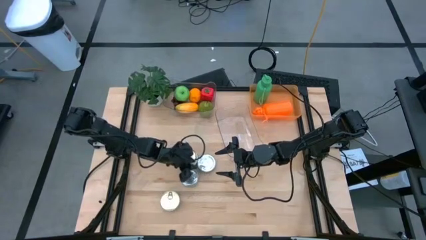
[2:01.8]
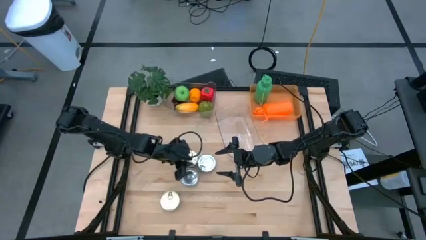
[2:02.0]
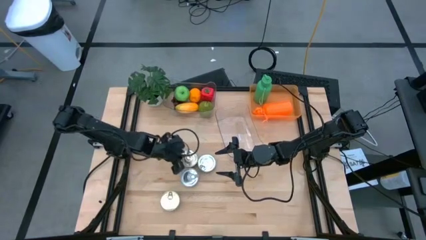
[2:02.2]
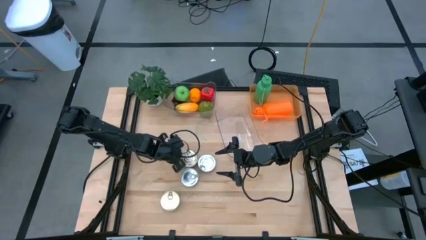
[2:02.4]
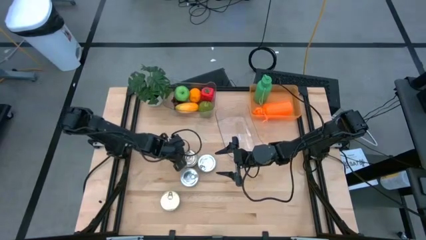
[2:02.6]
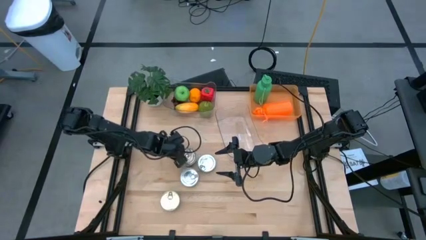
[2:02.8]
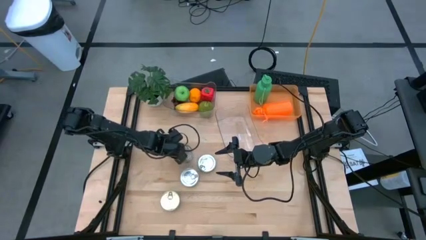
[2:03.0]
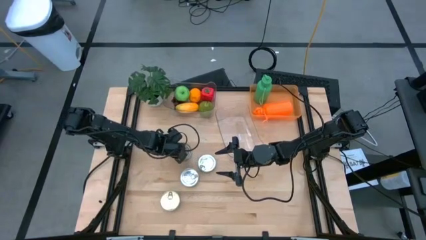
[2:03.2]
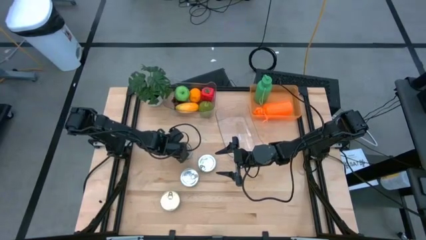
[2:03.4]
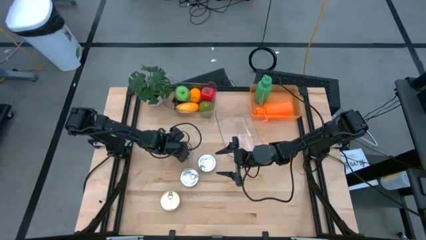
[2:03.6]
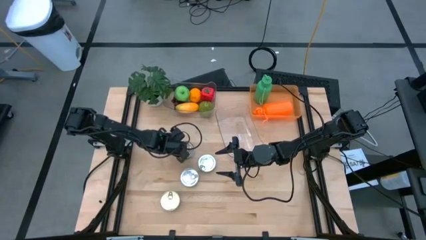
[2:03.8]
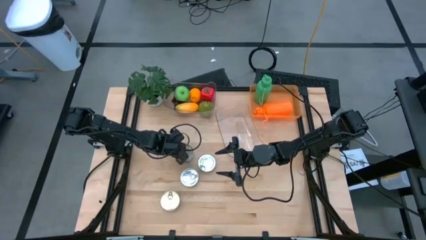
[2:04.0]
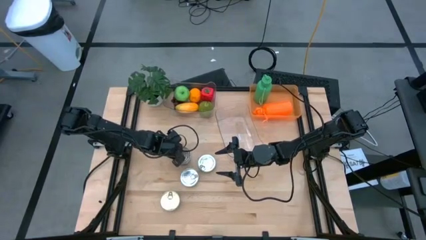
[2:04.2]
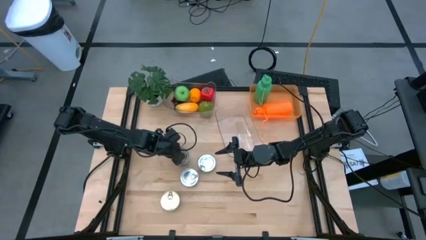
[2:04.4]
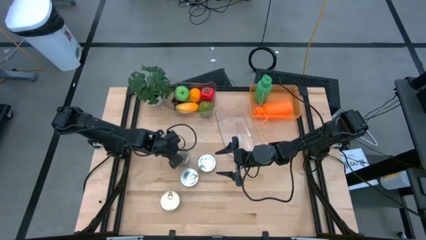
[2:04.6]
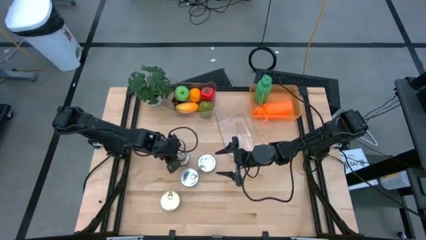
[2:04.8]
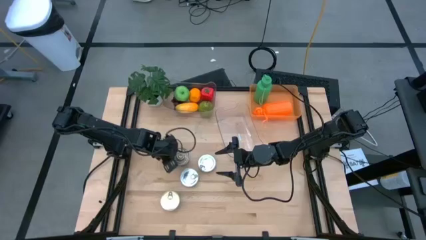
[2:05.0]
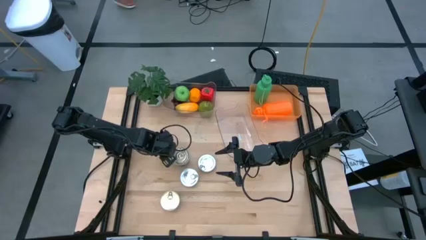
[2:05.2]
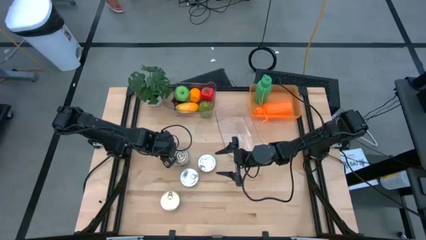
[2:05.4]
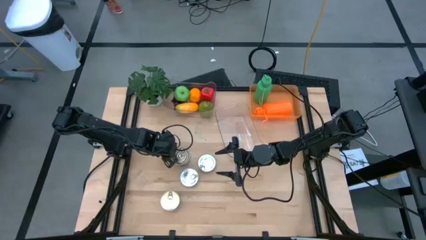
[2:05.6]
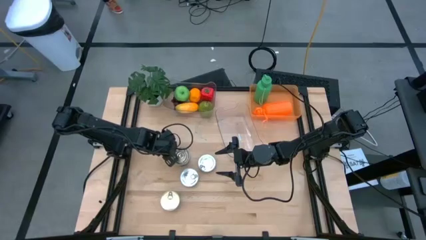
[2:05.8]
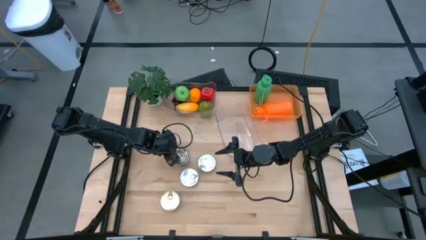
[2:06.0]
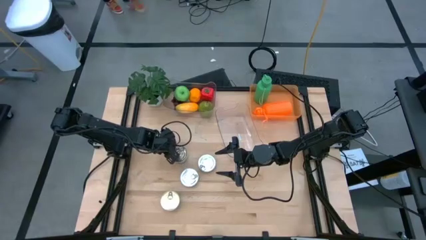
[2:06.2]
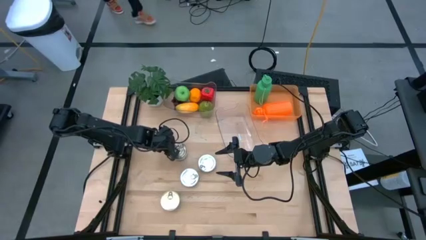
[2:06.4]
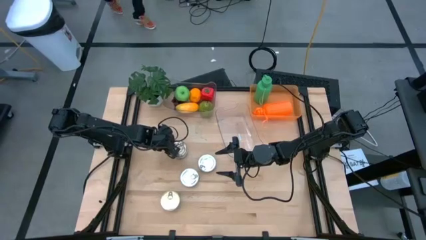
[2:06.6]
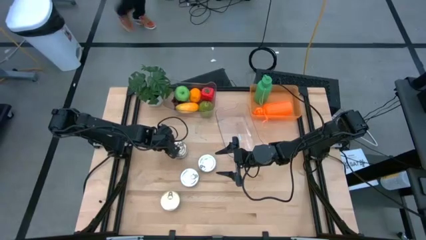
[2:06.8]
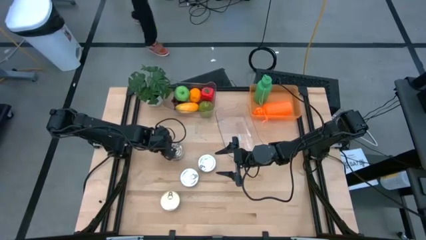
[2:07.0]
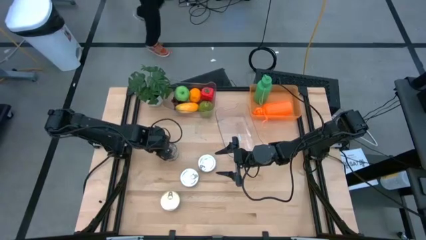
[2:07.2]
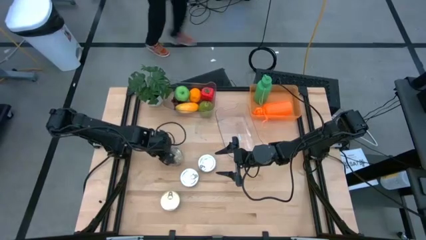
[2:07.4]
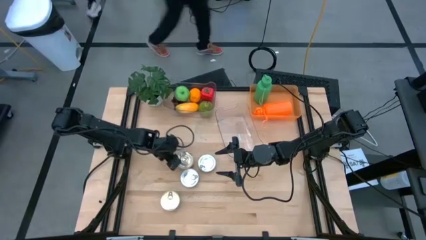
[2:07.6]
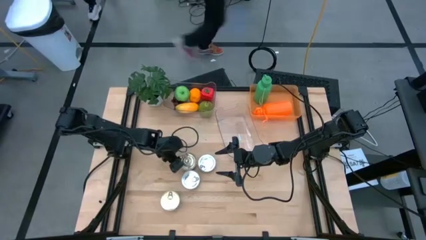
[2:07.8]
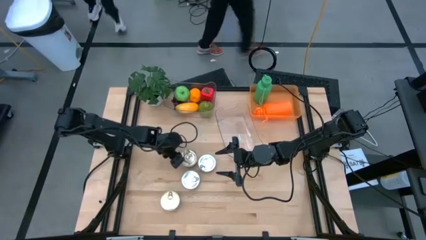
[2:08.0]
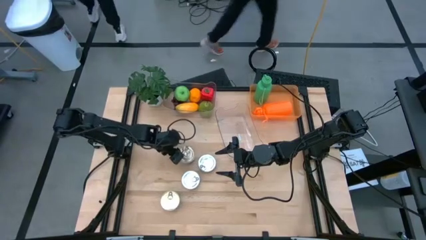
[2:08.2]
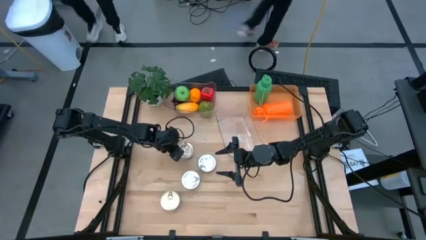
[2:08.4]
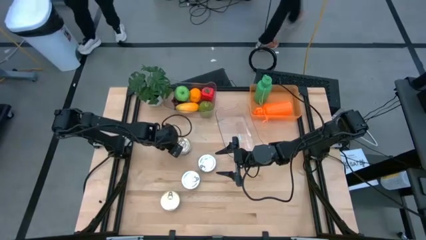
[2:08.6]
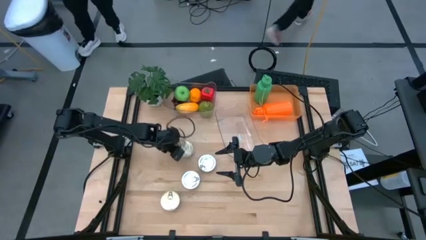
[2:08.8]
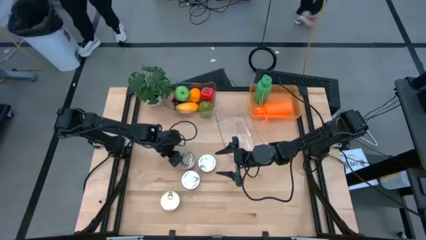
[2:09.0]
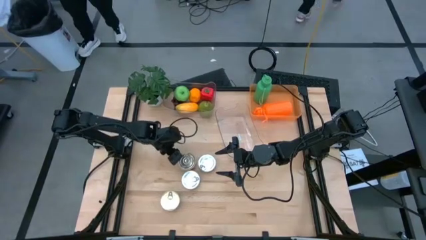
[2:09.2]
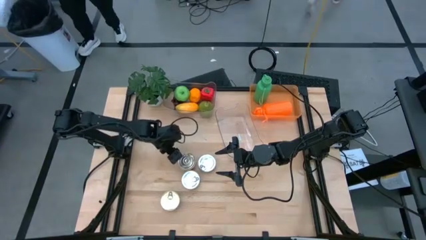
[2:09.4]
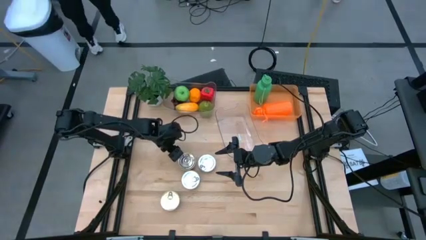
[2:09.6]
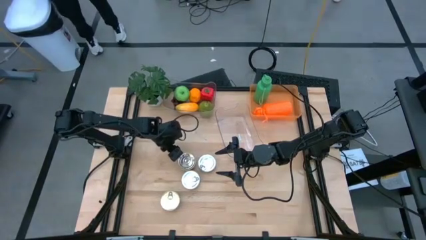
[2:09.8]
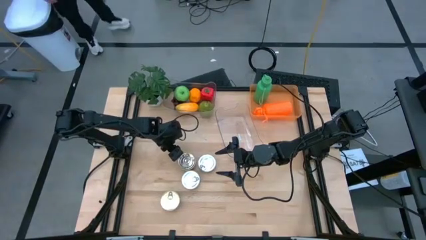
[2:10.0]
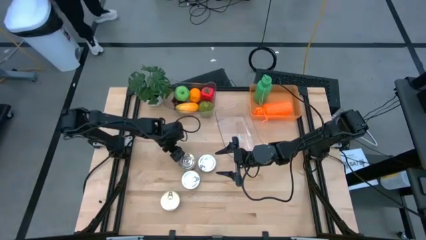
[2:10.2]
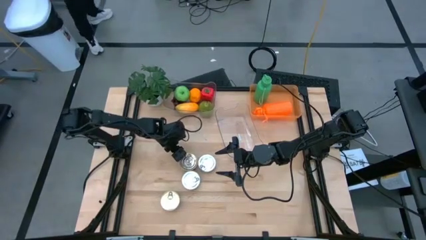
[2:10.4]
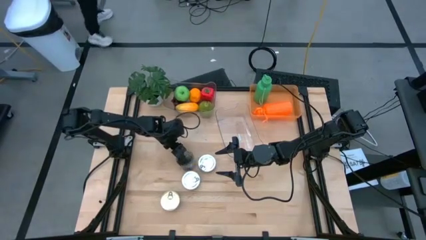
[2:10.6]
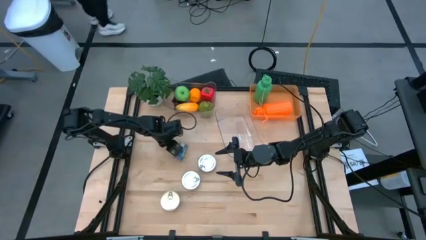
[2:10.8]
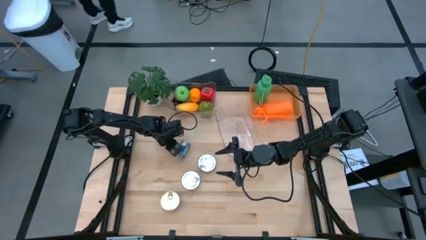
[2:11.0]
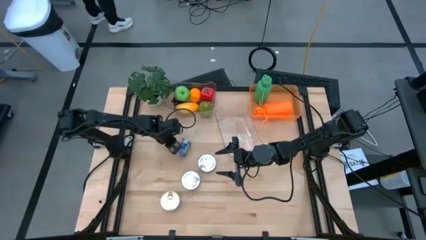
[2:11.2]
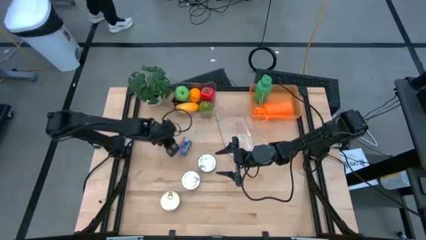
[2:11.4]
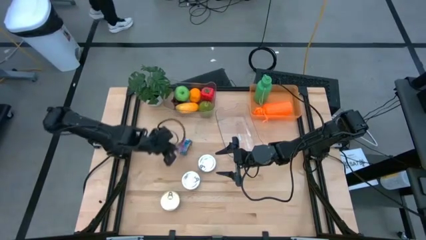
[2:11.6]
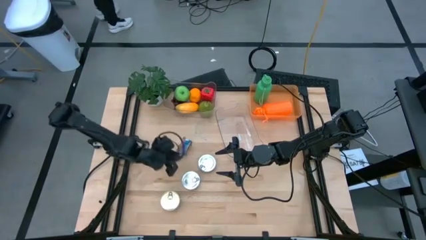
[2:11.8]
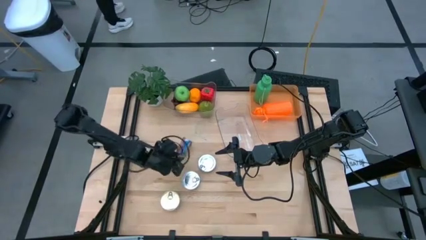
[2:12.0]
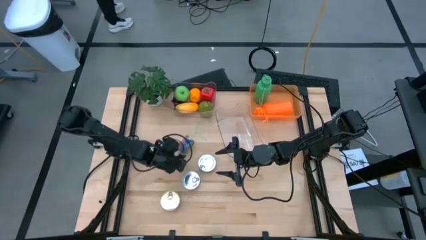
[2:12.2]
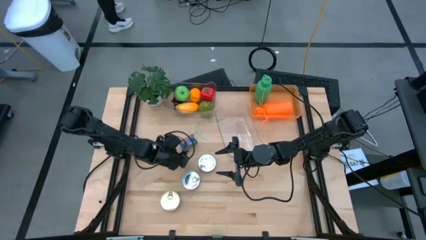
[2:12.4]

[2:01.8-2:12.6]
Task: Pick & Place Food Item
Put the top blue tuna can into the bottom transparent bin

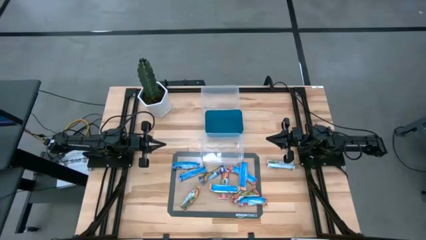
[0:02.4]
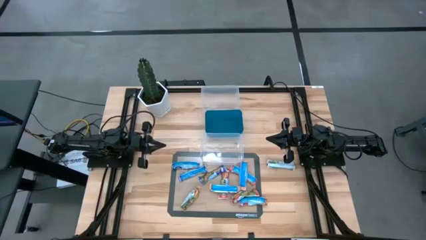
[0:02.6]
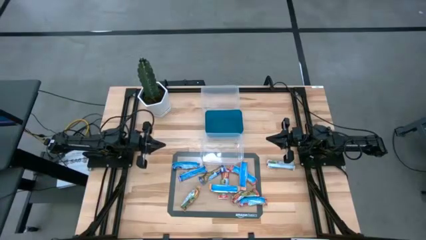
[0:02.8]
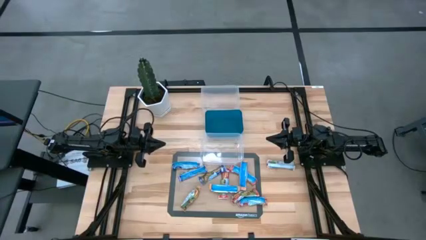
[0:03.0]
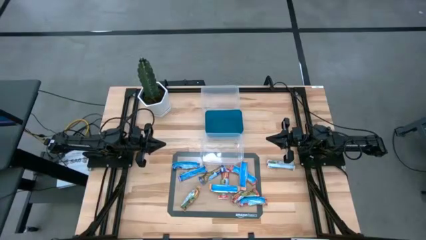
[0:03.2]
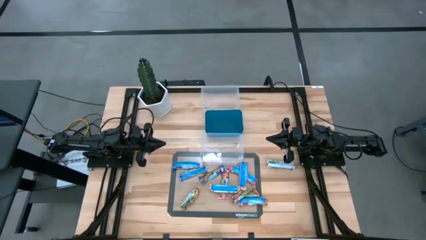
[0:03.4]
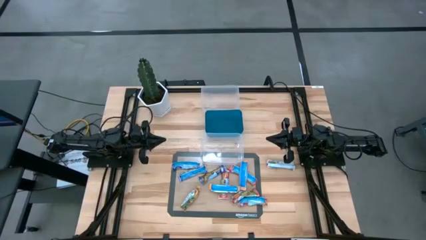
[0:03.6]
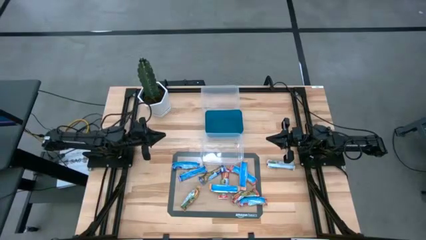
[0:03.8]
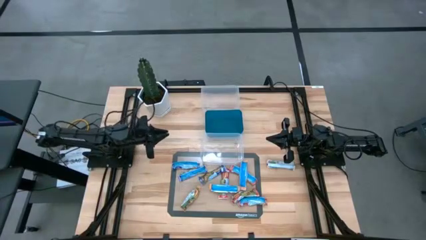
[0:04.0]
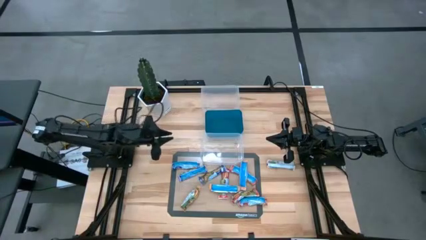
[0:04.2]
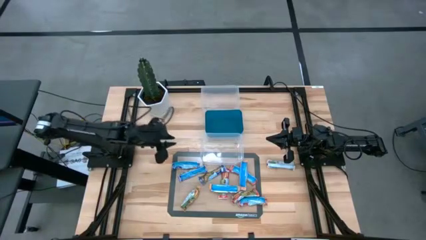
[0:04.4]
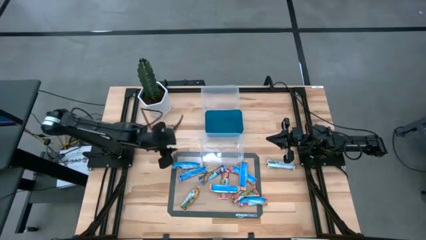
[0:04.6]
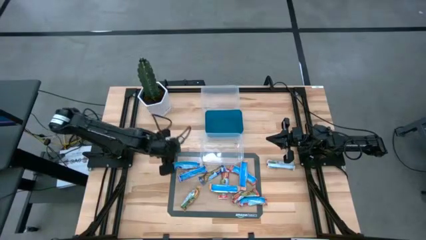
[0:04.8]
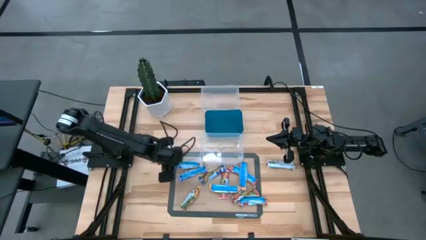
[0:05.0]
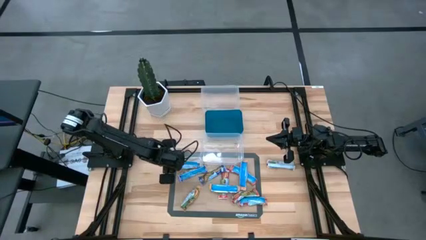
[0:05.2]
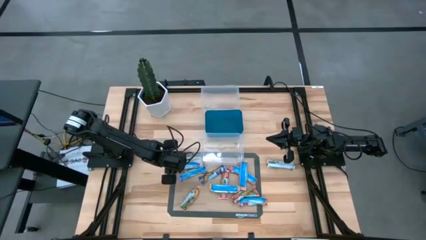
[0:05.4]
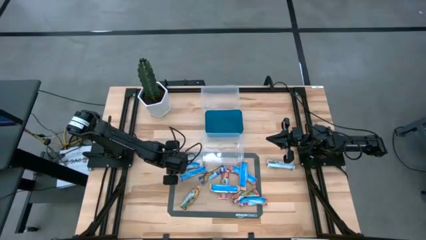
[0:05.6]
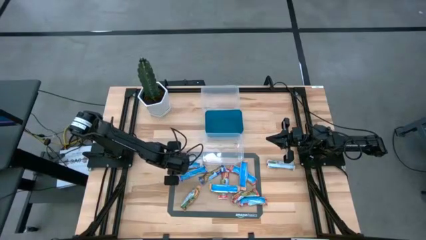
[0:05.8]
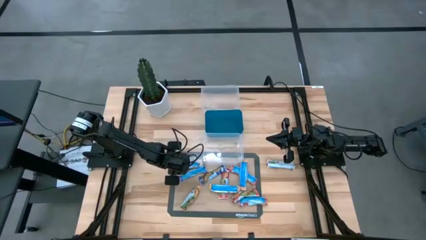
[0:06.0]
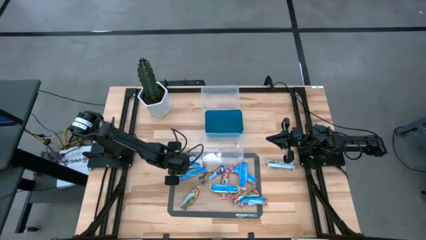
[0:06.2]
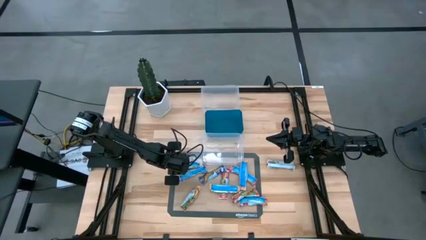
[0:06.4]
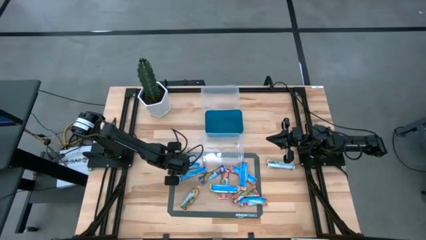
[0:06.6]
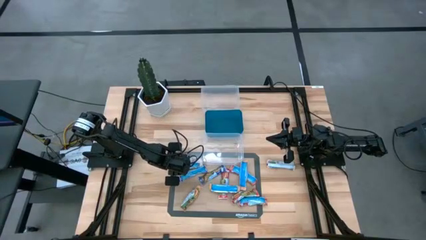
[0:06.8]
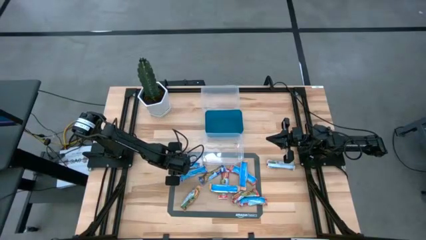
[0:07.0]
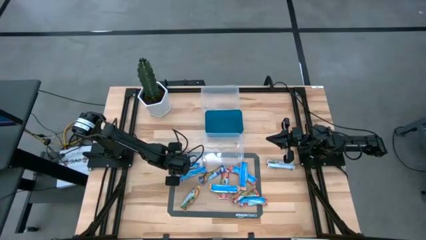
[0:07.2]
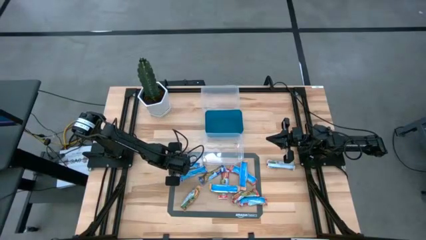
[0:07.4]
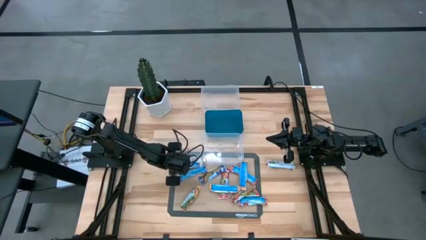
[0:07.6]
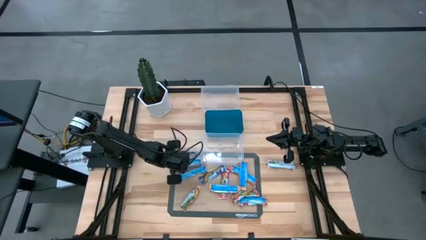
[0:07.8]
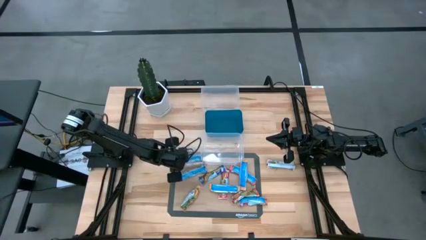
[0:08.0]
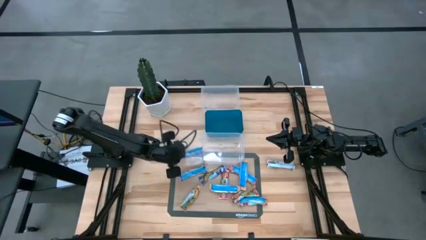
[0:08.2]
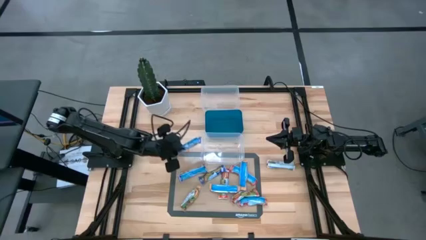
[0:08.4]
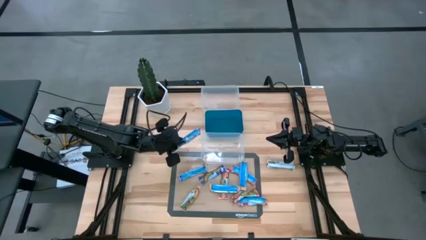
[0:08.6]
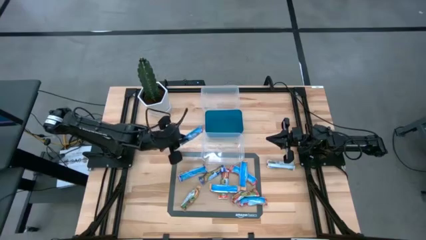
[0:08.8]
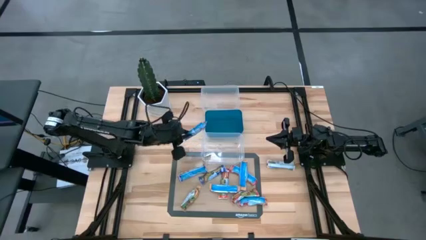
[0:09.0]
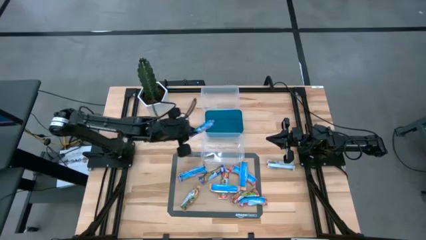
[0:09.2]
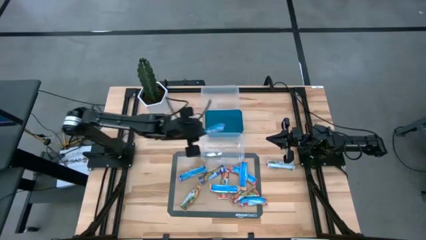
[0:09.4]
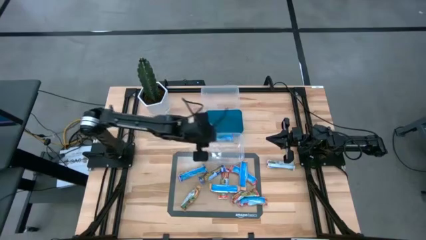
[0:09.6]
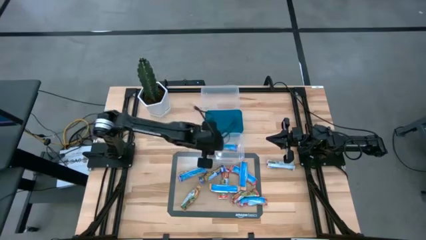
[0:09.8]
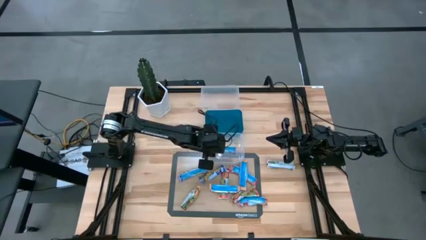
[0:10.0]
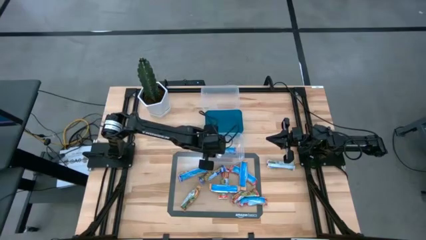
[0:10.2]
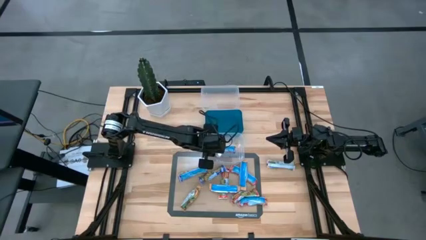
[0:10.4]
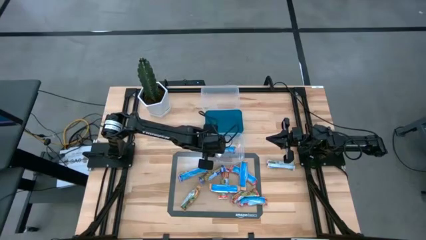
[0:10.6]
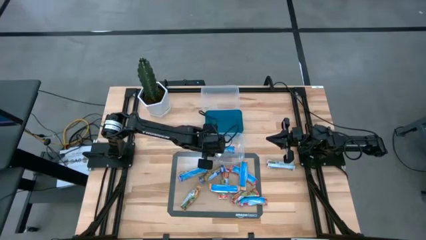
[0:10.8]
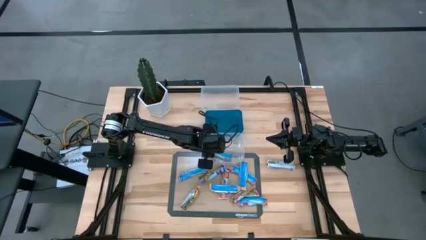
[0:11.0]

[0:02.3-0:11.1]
Task: Pick and place Granola Bars by type
Put the blue granola bar into the bottom transparent bin
